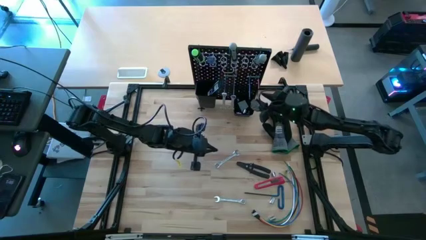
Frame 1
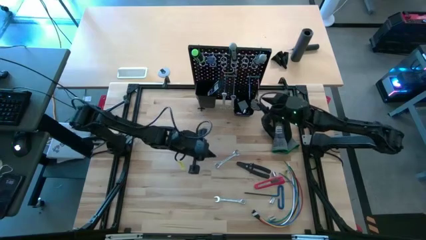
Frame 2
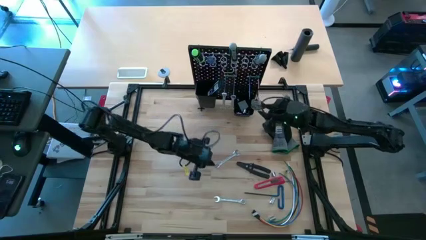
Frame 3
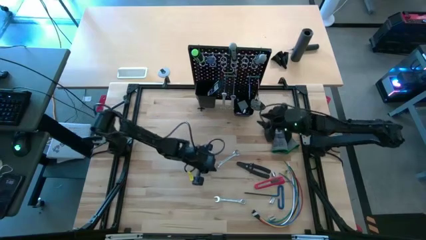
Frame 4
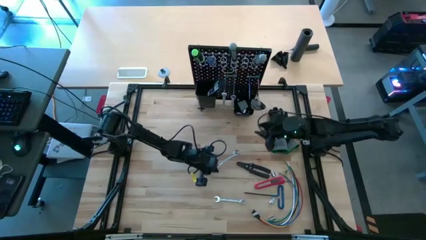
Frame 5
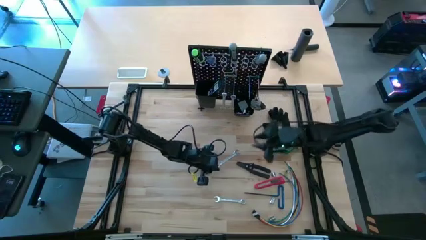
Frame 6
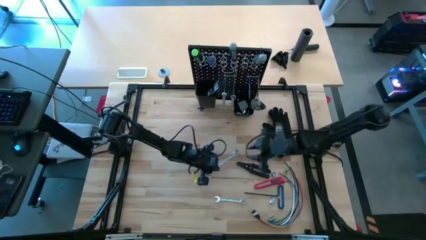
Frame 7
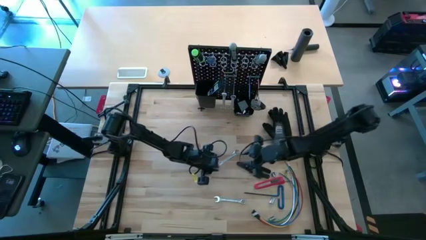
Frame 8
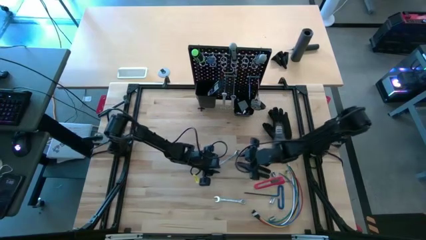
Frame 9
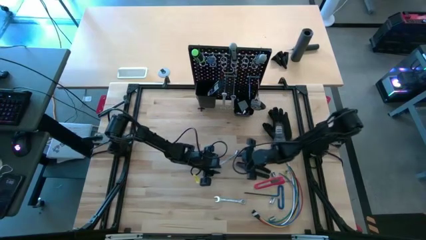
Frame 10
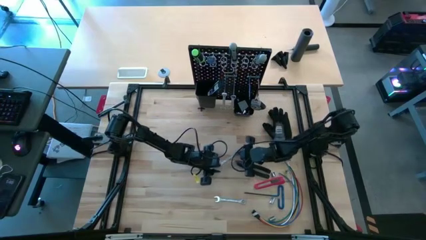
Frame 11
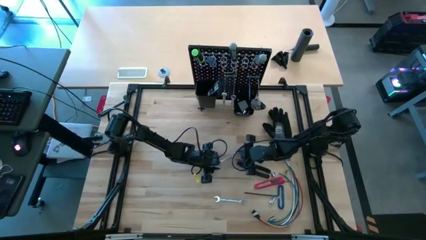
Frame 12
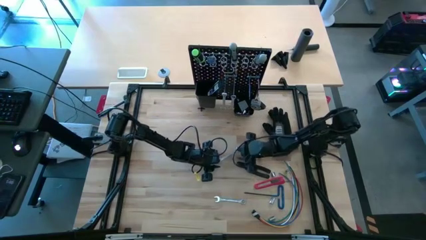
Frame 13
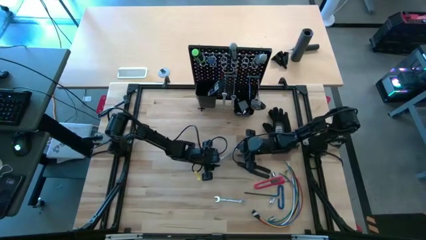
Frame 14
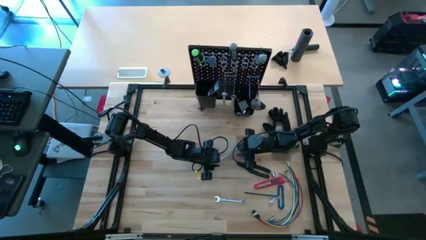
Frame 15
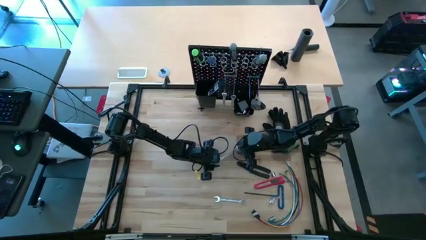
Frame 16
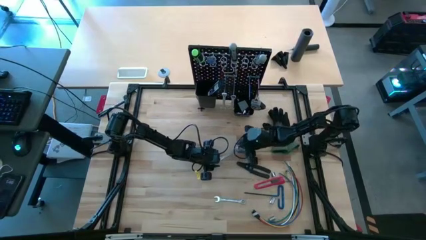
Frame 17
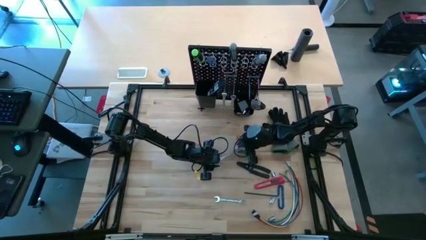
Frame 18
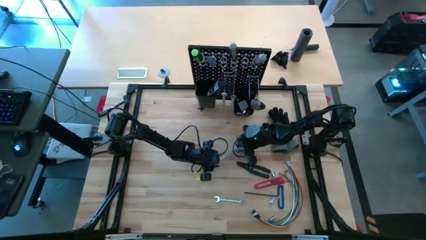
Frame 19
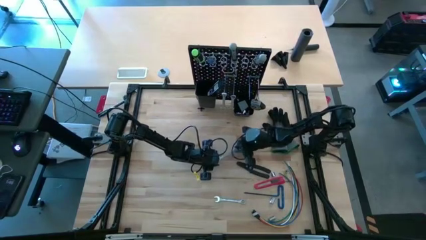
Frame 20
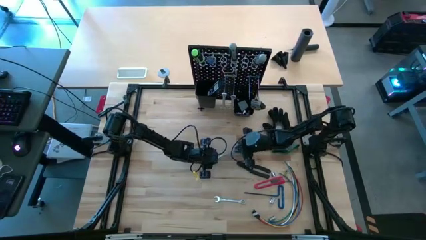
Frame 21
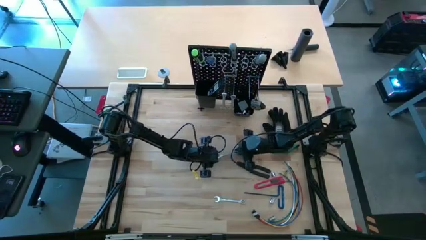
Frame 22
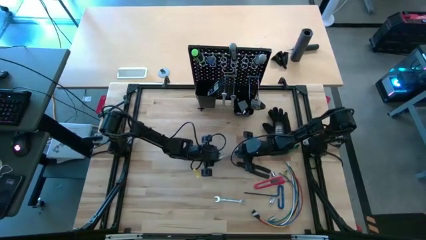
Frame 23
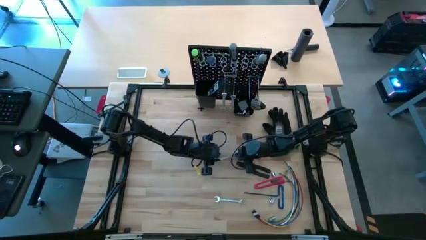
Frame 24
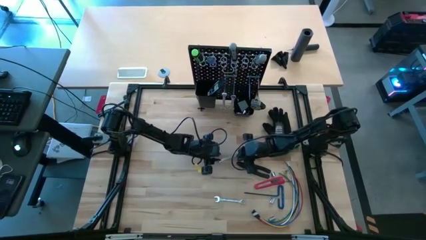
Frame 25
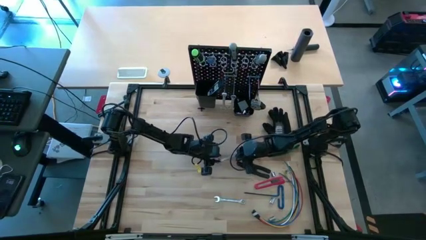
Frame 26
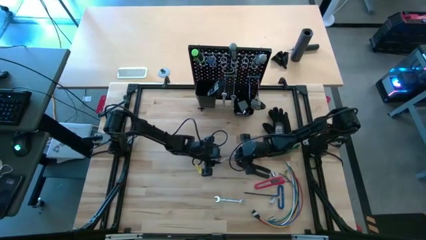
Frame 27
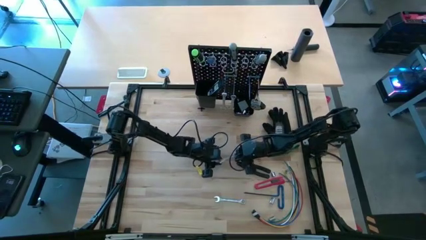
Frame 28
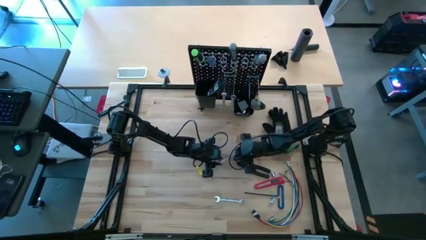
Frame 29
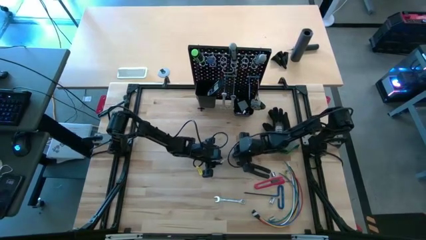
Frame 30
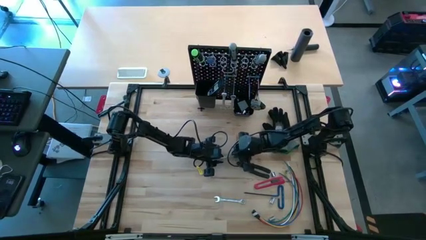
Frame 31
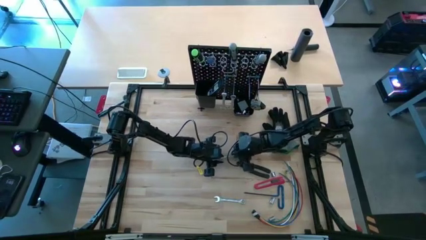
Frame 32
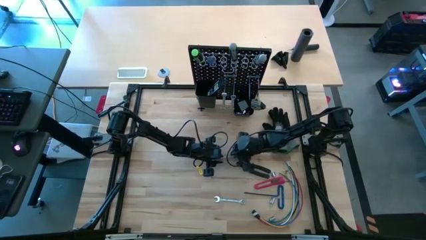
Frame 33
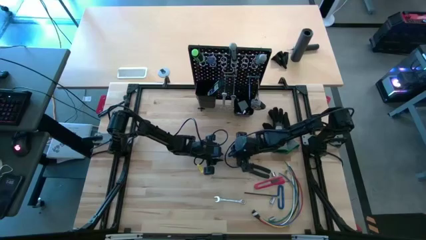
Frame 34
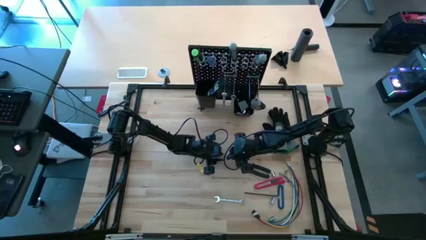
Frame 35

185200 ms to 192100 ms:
Task: Hang tools onto peg board
Hang the silver wrench on the peg board

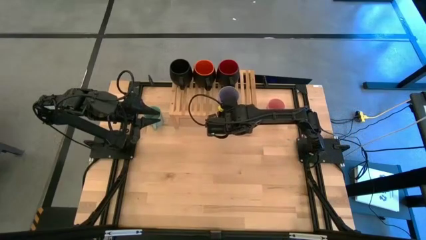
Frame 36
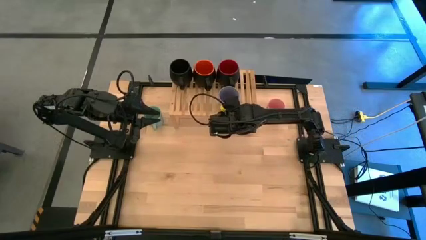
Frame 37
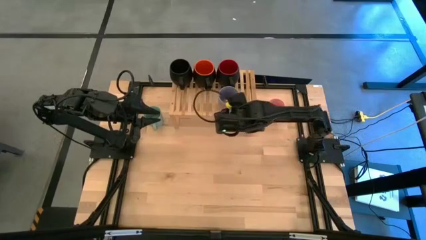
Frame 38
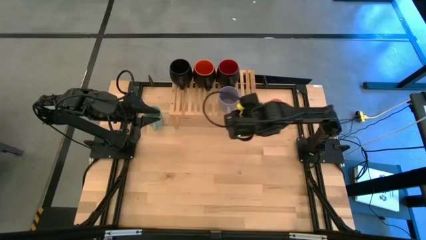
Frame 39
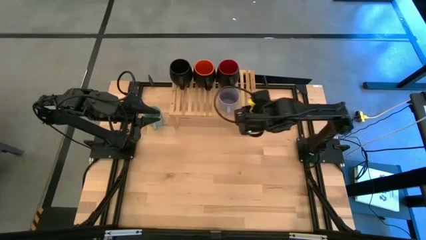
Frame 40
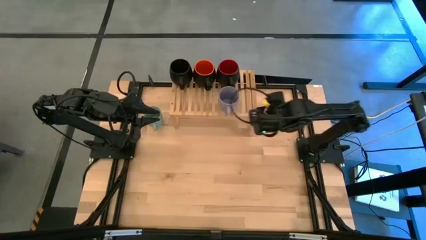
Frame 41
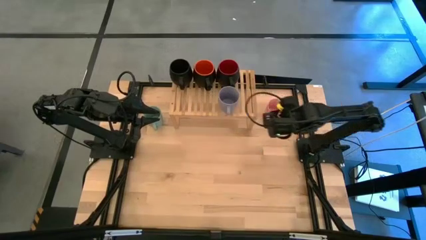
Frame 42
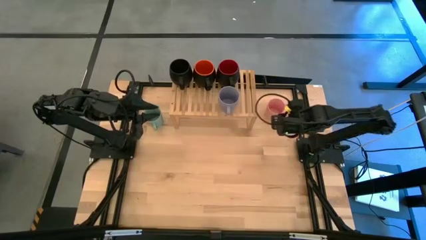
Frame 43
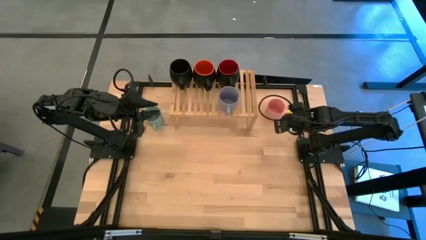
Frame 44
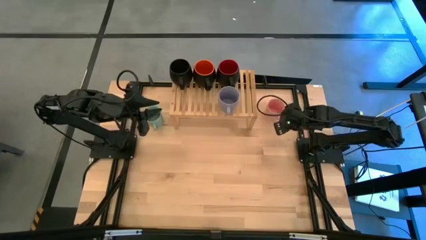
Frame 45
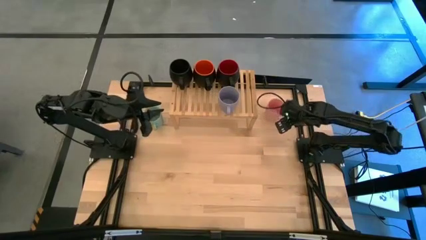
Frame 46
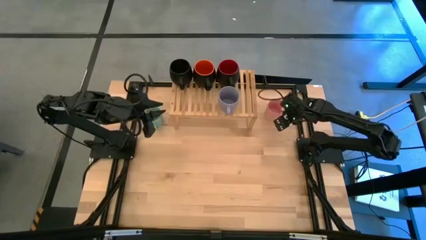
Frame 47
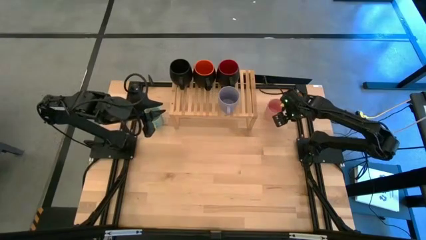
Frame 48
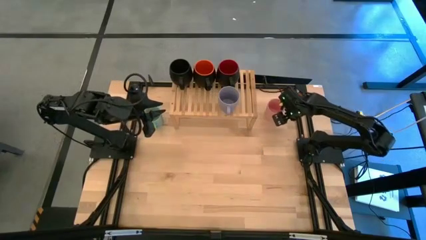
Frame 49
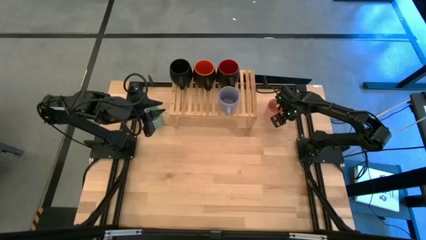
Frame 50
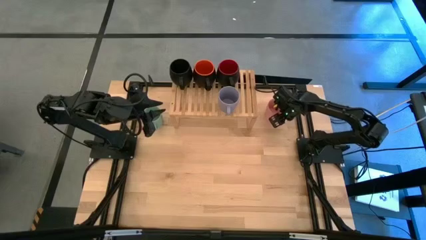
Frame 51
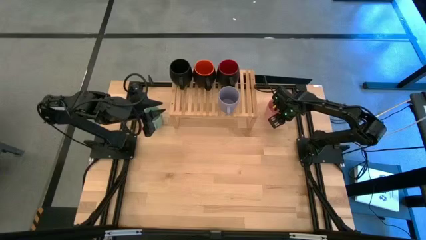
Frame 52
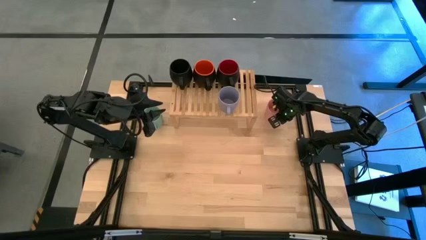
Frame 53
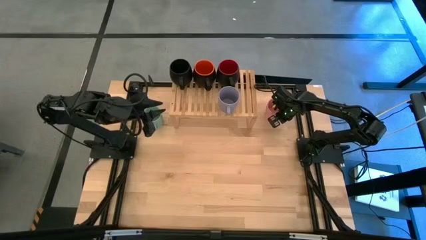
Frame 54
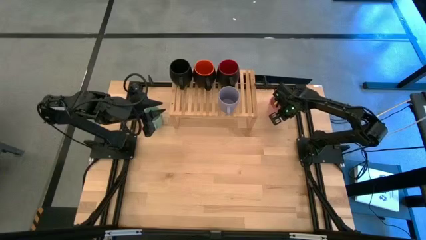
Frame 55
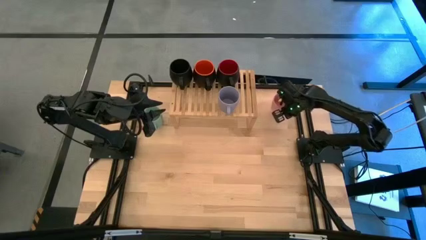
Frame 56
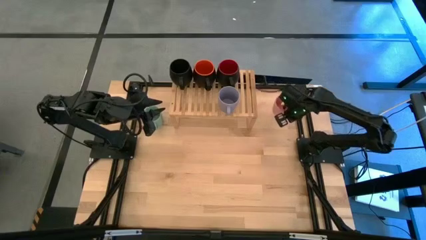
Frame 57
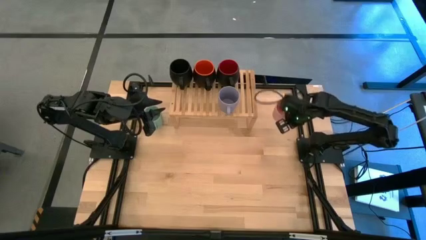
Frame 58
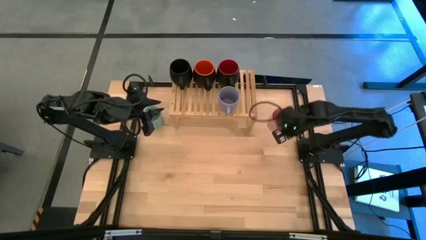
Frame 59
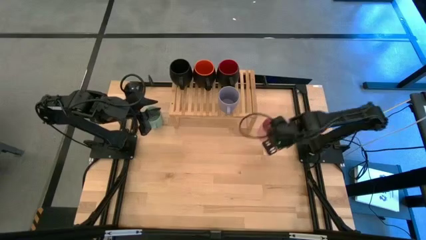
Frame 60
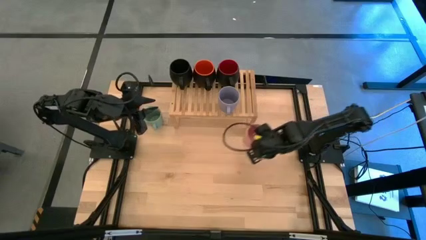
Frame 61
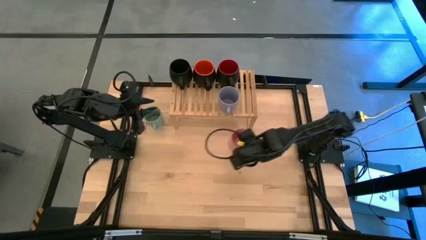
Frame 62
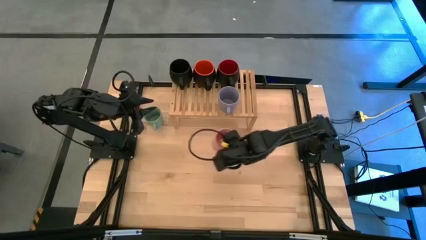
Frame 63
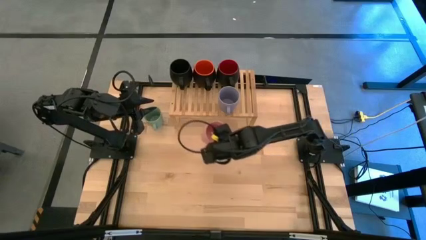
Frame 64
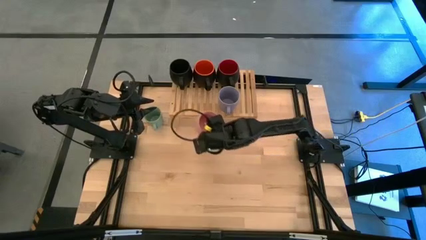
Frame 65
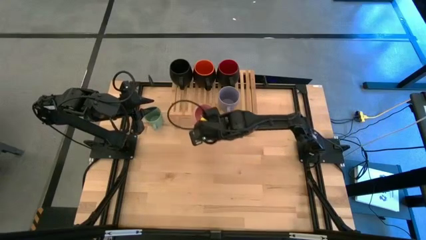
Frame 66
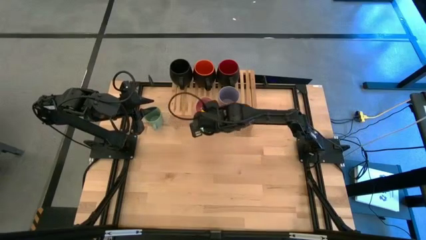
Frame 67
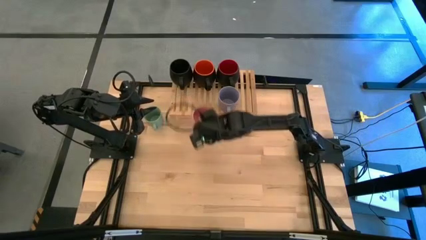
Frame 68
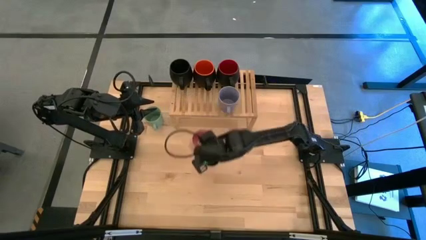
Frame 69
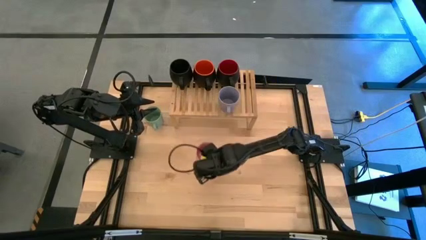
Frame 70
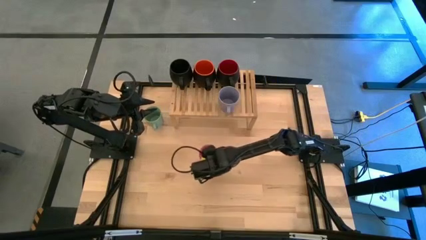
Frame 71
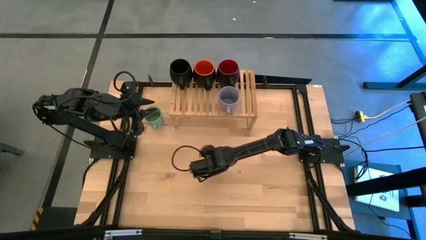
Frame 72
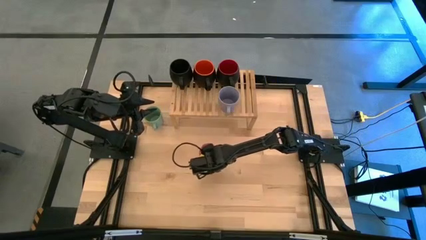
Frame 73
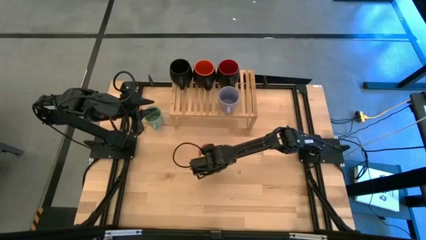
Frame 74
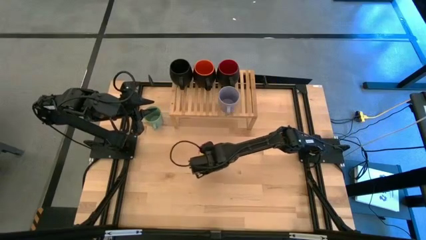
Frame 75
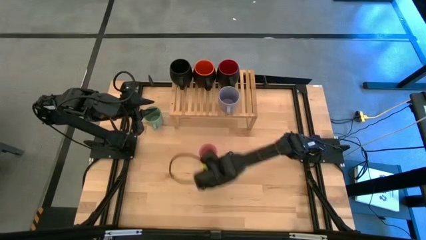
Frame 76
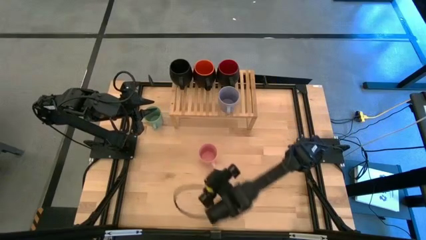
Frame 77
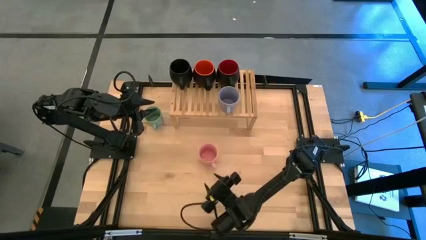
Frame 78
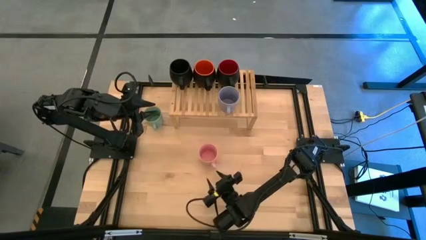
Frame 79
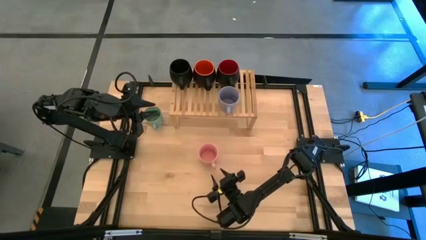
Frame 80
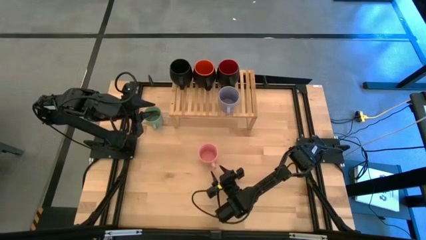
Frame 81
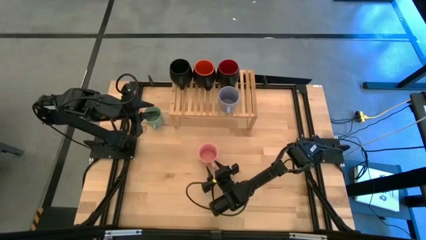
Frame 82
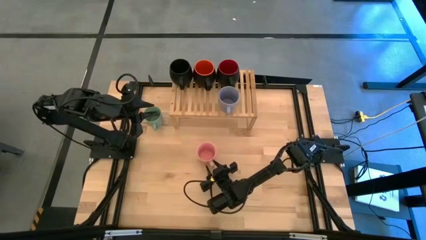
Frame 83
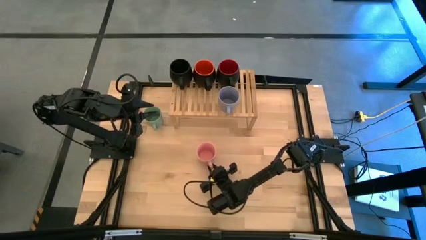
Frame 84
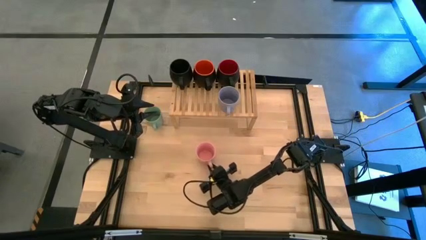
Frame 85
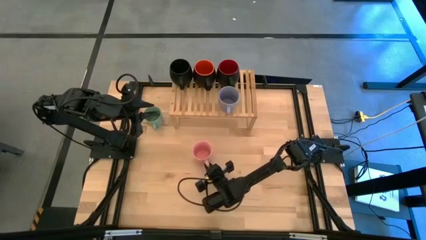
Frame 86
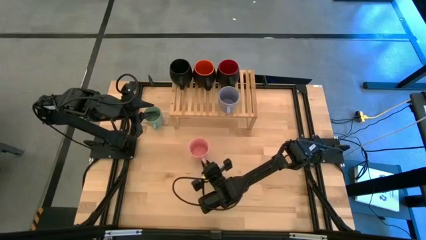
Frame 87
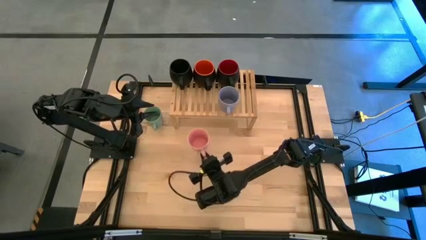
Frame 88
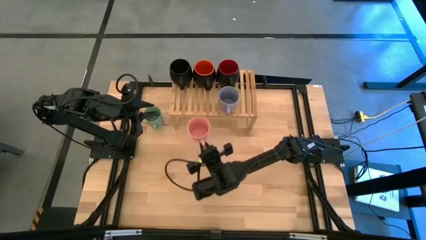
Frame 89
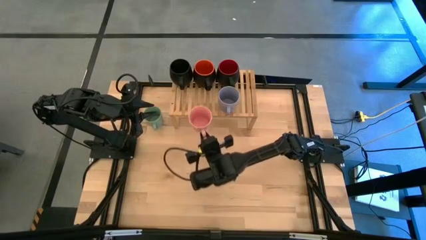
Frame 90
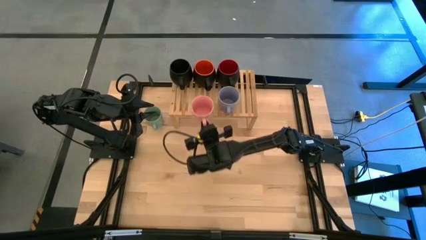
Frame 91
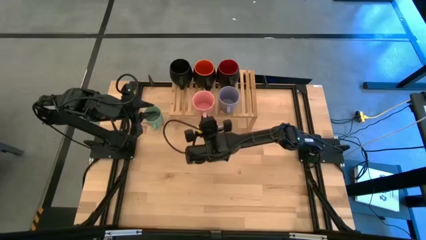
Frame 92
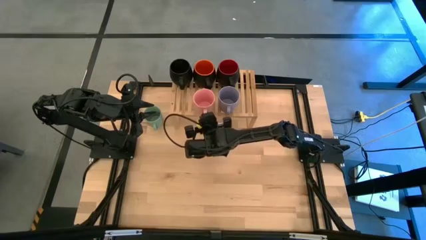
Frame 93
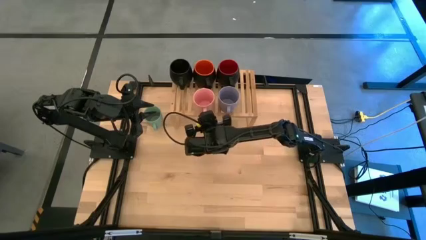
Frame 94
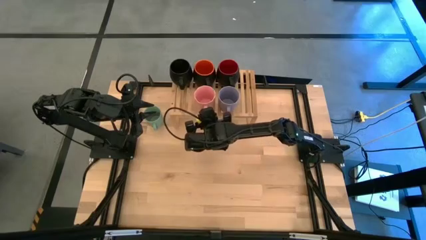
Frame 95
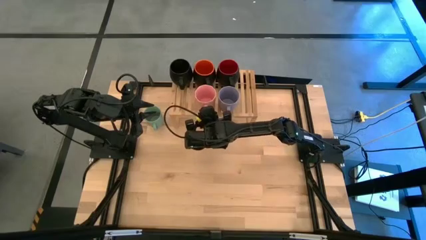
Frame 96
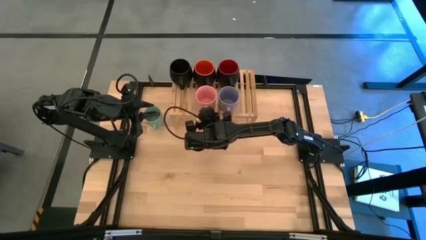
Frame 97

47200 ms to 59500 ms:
Task: Place coffee mugs
Put the pink mug on the shelf
